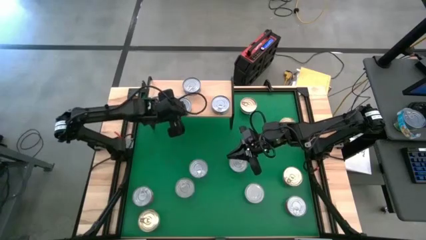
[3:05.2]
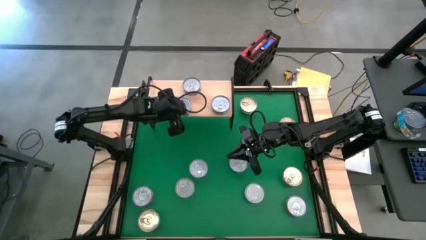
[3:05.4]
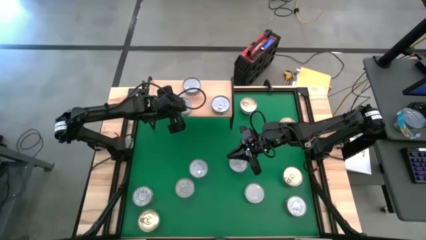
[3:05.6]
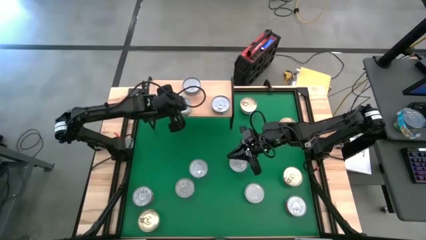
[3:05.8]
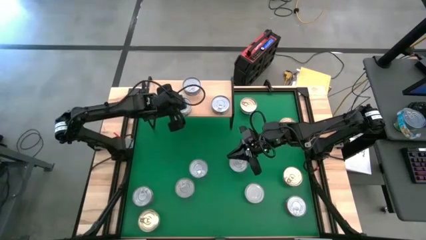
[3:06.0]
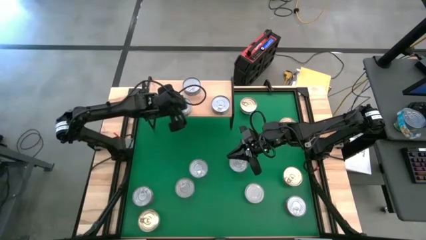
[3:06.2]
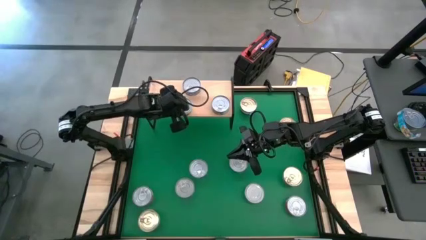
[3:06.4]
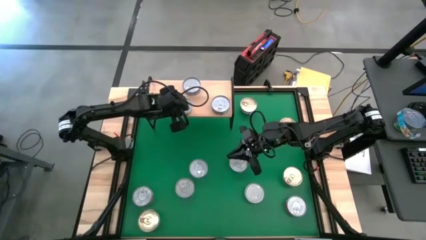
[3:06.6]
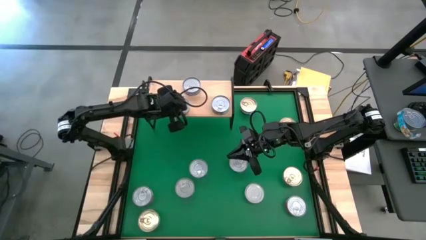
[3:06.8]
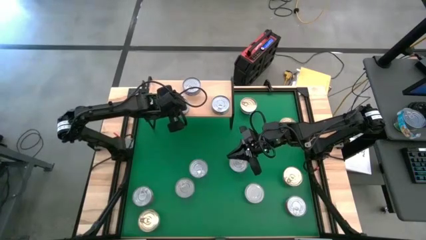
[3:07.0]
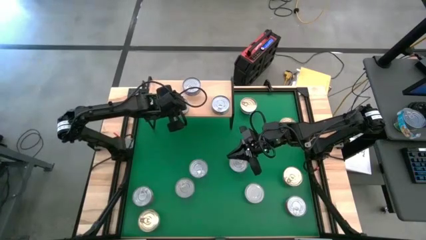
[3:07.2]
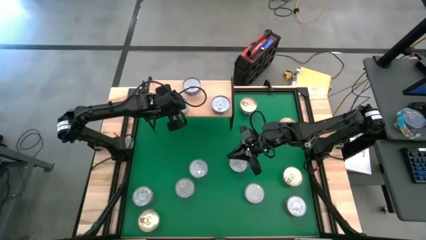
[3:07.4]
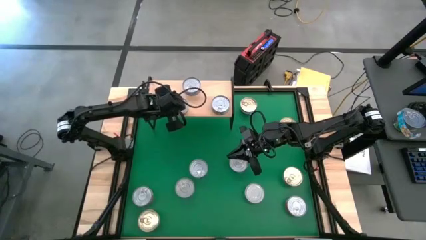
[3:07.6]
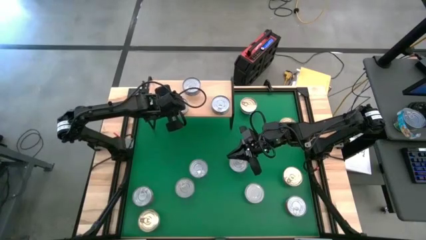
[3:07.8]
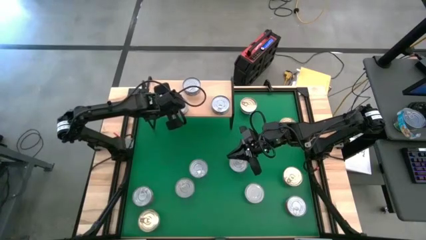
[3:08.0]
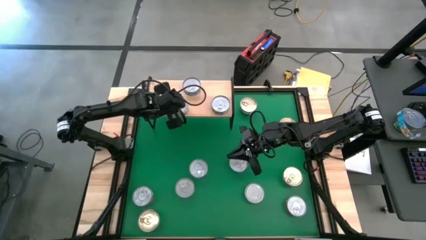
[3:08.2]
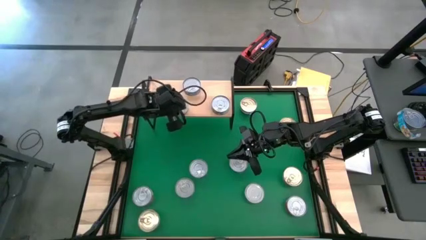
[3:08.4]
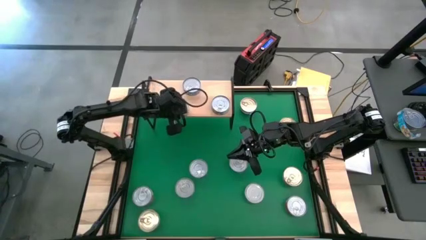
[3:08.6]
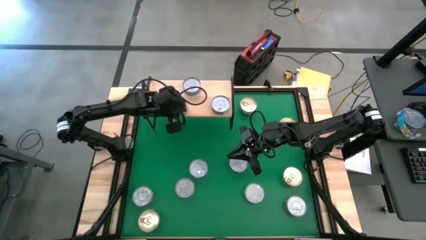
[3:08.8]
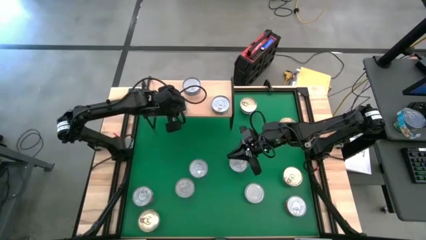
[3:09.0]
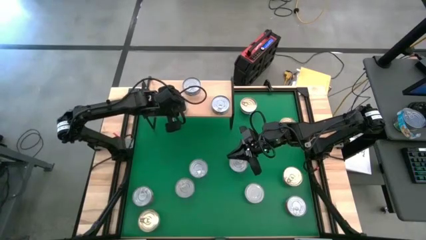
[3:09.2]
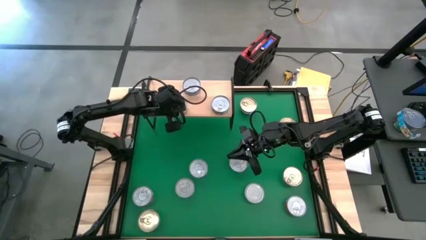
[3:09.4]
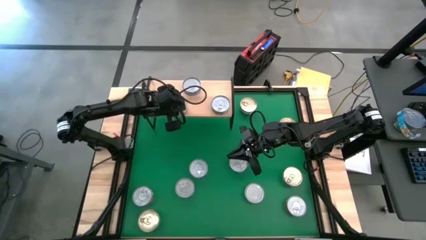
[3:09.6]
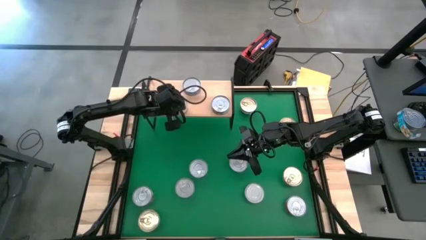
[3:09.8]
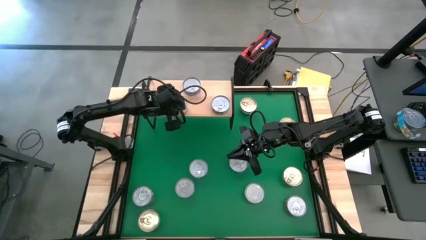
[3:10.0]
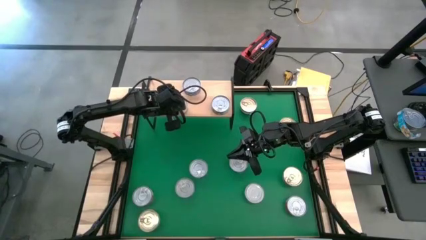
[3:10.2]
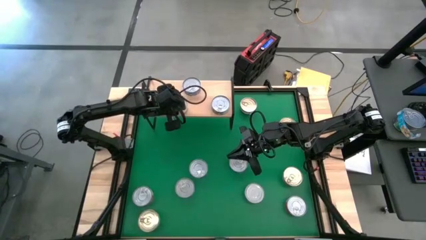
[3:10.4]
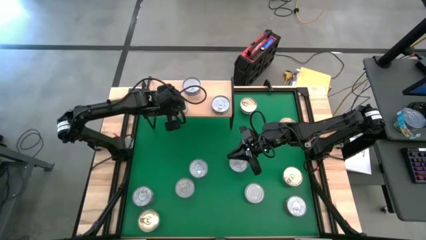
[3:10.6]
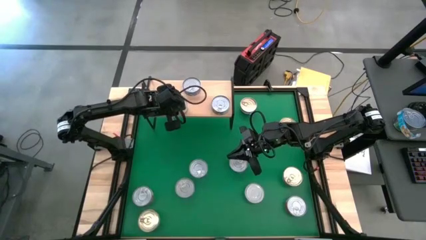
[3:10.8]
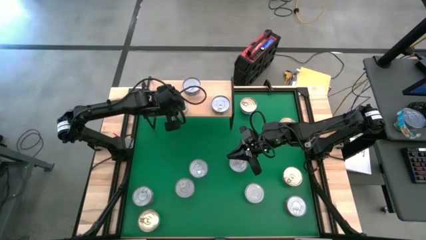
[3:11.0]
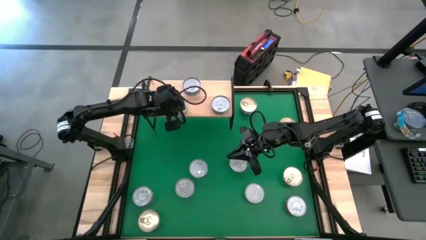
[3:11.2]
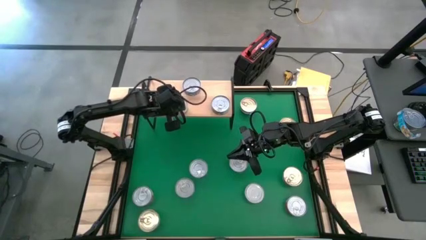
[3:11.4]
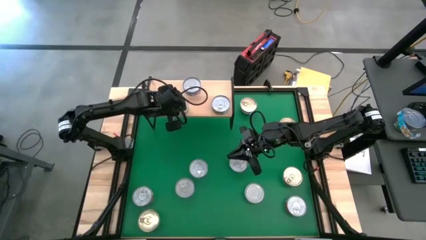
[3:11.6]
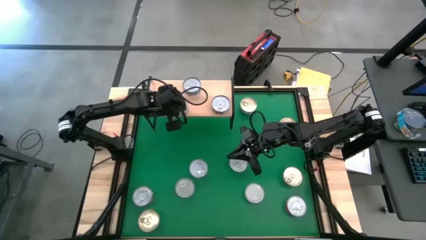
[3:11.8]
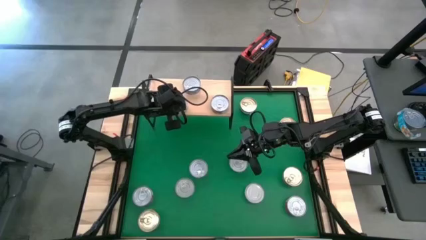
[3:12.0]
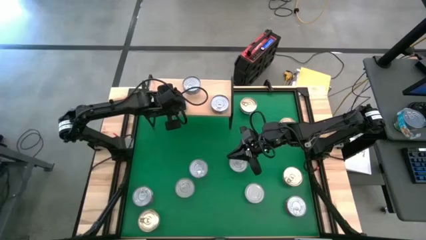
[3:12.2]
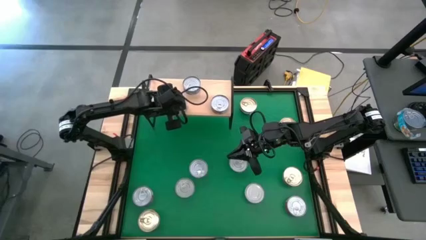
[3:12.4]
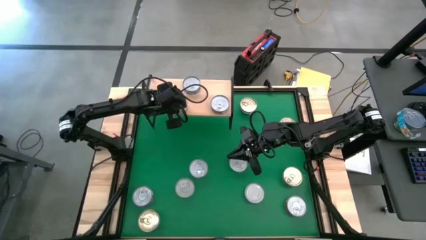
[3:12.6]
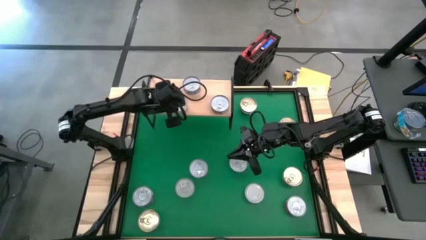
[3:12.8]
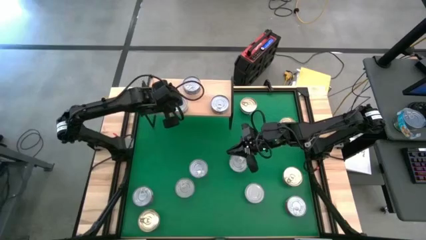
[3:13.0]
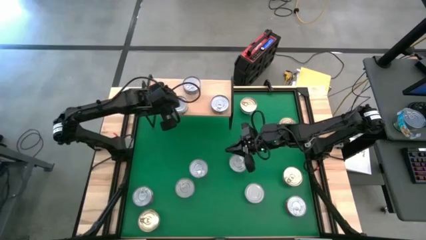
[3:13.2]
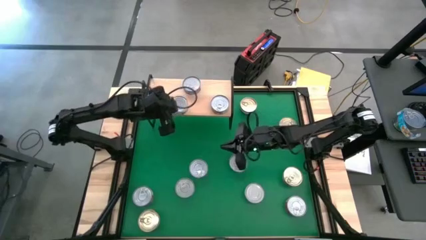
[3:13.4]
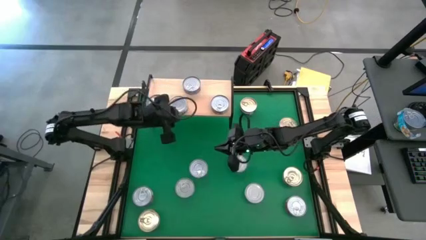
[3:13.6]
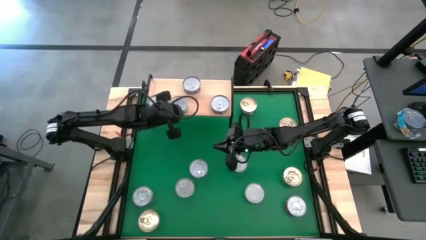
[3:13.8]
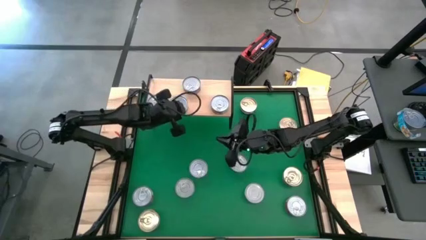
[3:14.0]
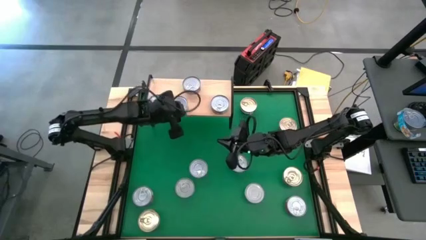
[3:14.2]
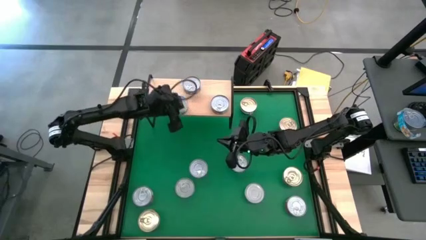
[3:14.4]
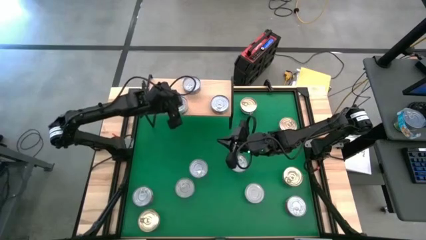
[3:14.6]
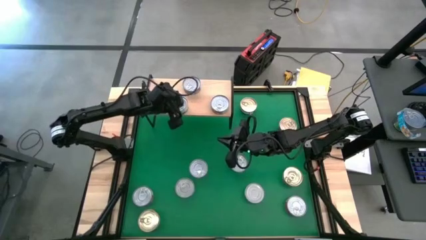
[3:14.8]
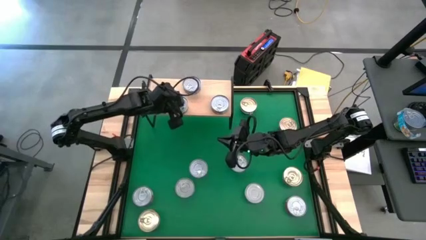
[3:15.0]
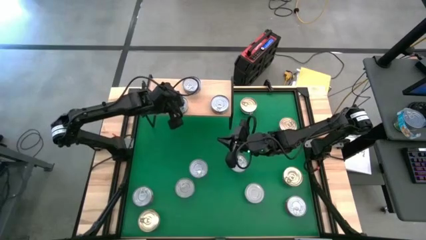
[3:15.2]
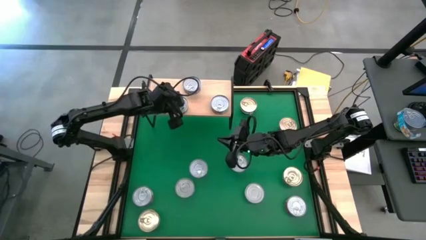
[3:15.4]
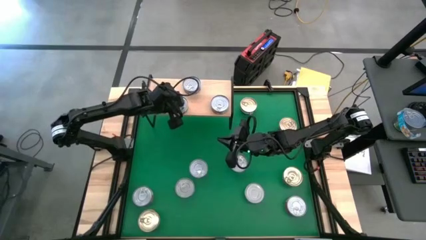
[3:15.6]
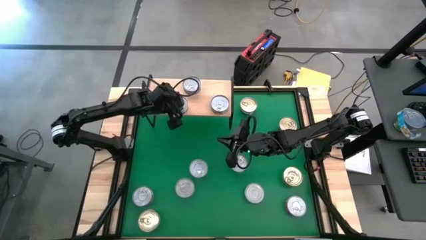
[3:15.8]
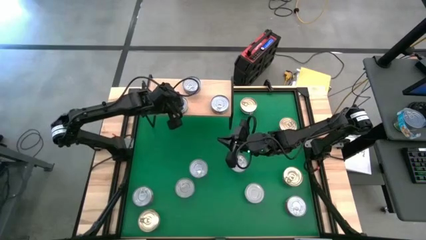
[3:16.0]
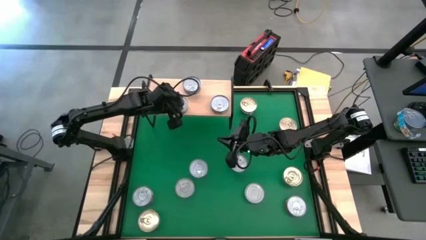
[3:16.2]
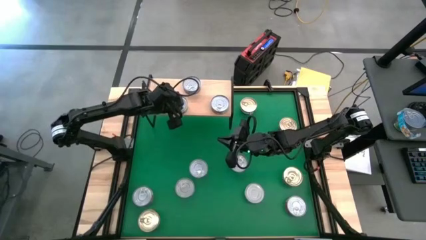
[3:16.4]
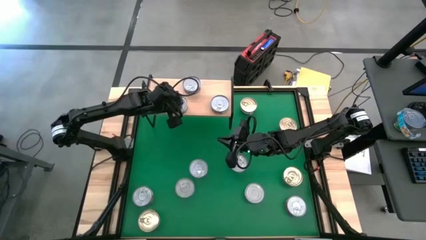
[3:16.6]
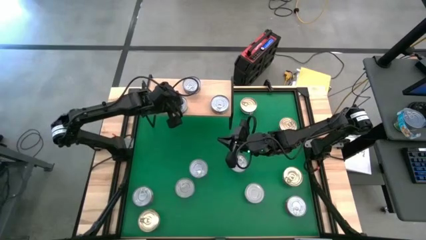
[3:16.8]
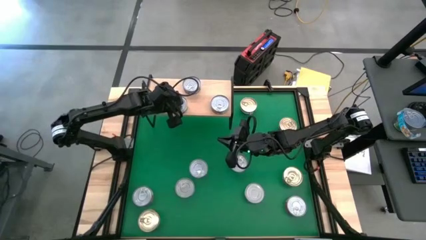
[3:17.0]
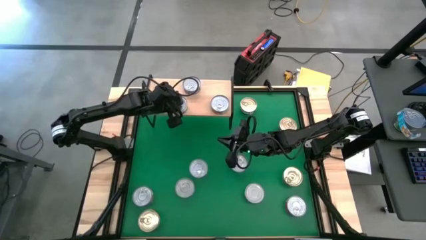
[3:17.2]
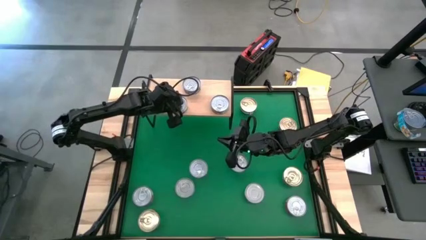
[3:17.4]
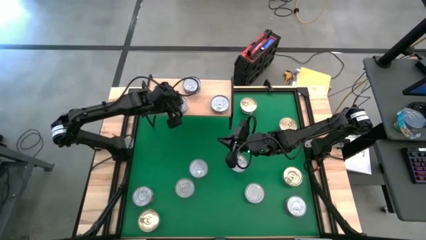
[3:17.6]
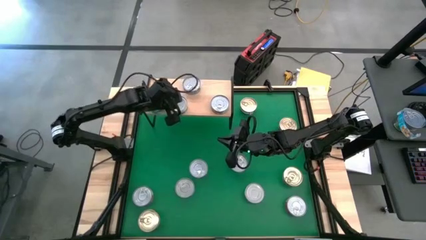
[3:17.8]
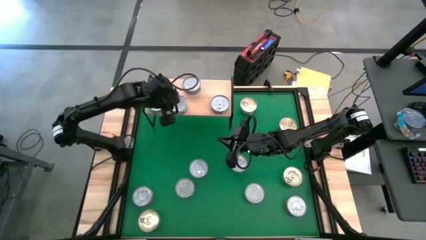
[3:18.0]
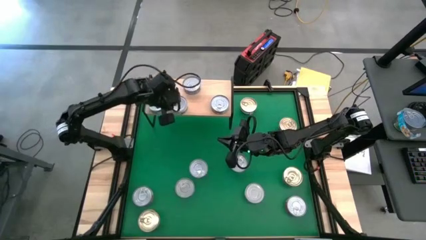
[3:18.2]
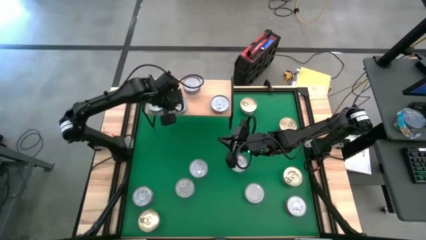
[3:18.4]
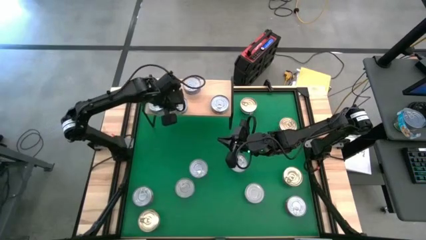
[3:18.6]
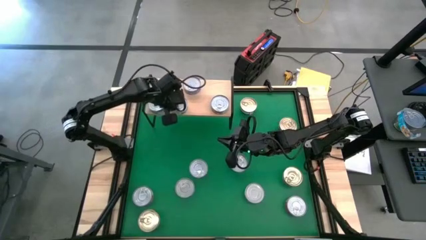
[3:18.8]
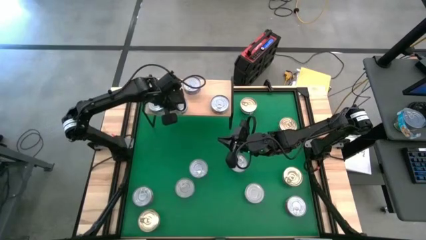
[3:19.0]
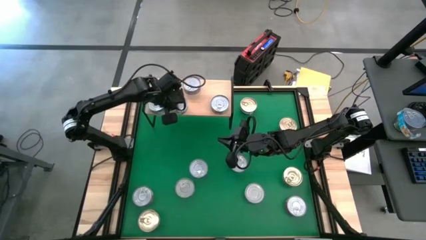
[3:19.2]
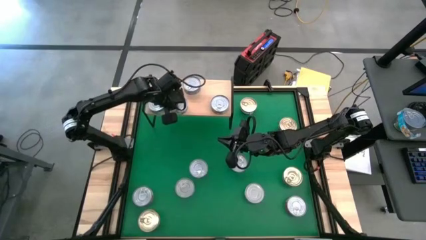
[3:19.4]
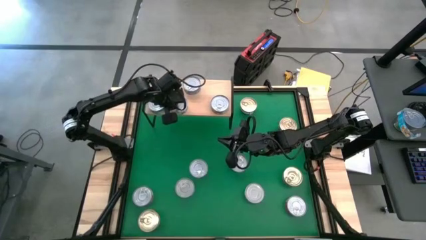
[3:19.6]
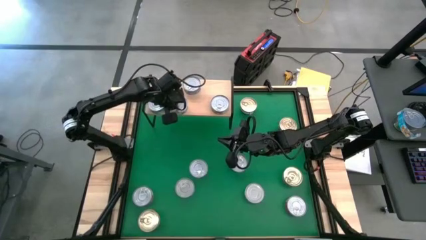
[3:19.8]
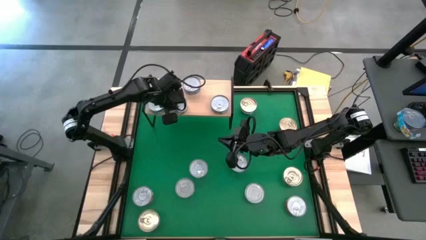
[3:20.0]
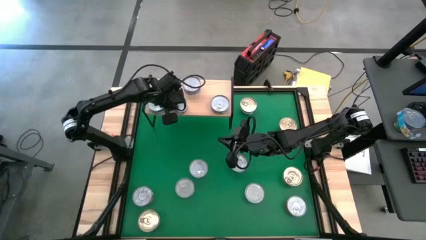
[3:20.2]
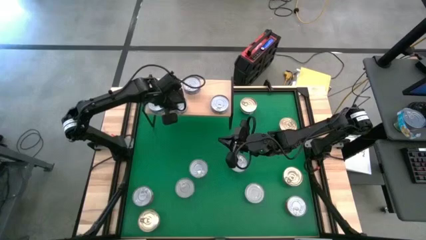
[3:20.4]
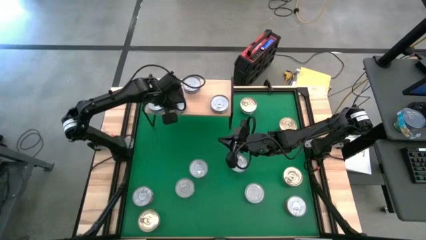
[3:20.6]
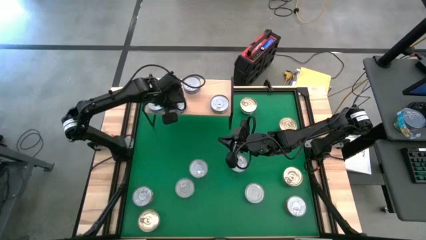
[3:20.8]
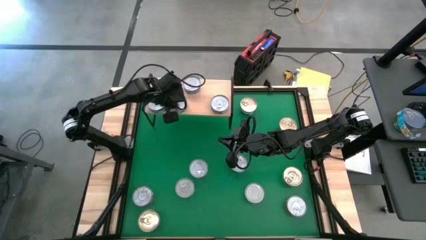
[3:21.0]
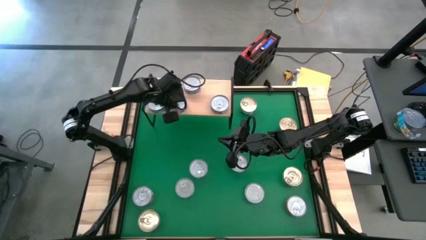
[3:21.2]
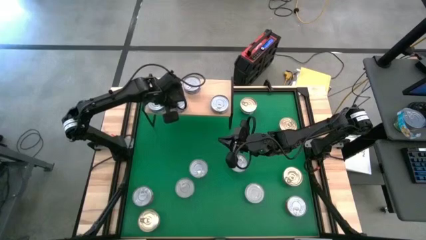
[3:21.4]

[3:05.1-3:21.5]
Task: Stack canned seafood by type on shelf
Put the bottom right white tuna can on the shelf
